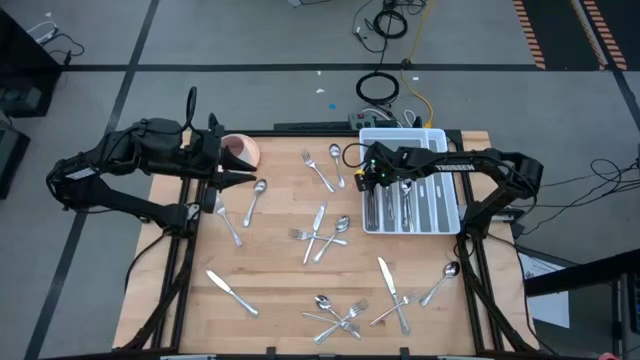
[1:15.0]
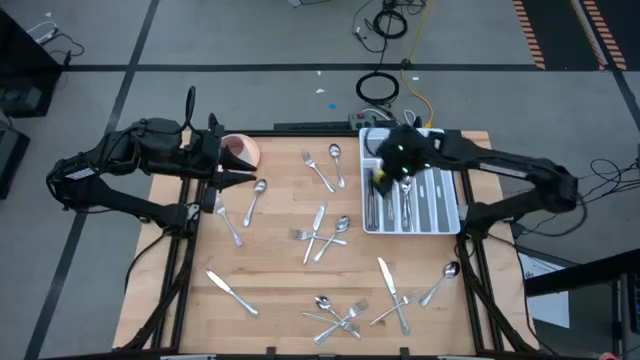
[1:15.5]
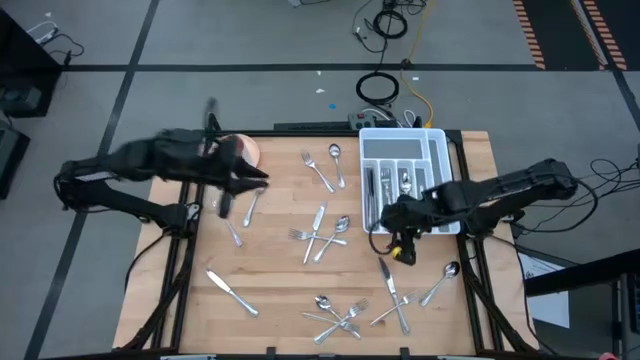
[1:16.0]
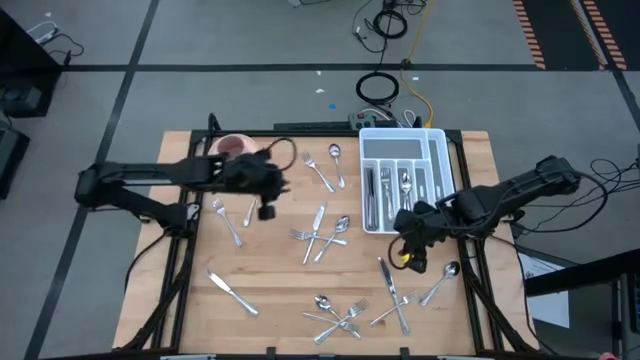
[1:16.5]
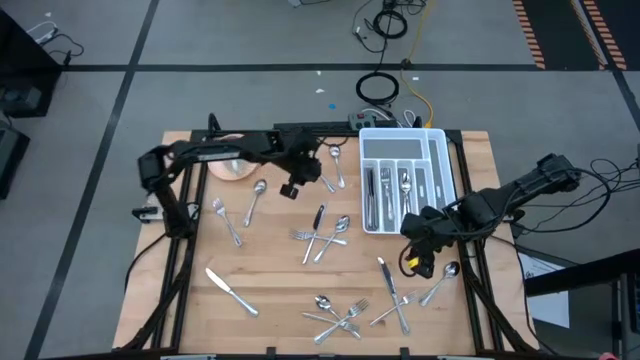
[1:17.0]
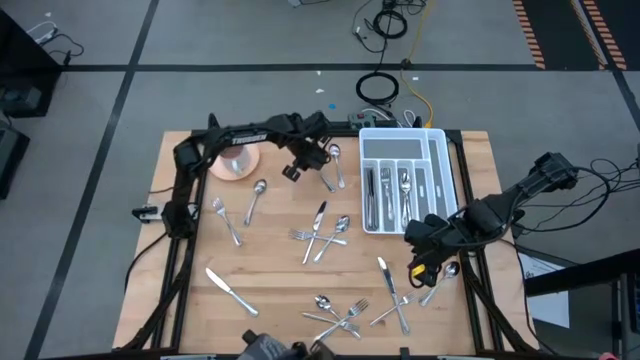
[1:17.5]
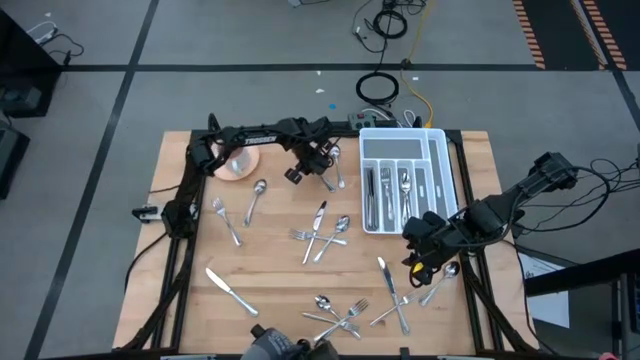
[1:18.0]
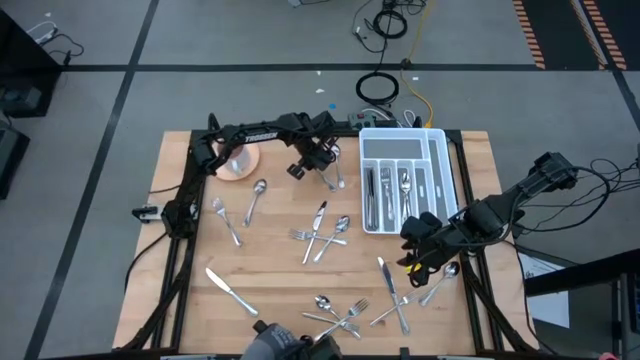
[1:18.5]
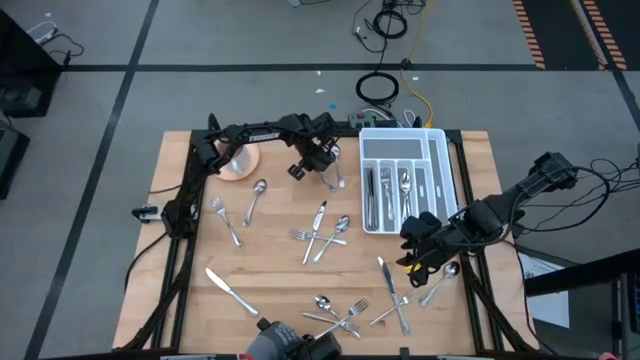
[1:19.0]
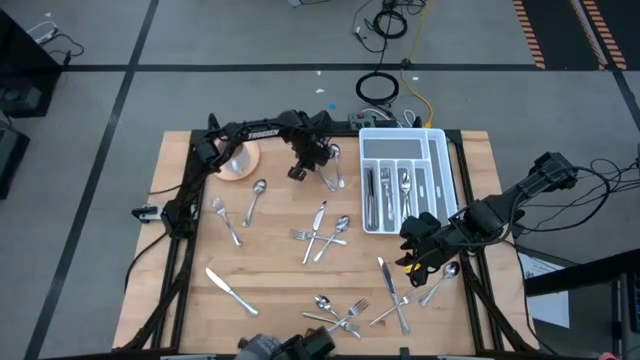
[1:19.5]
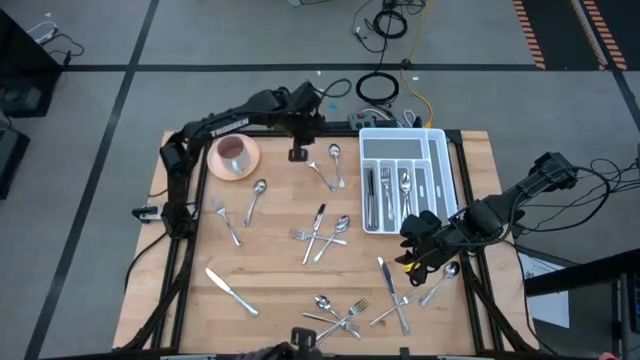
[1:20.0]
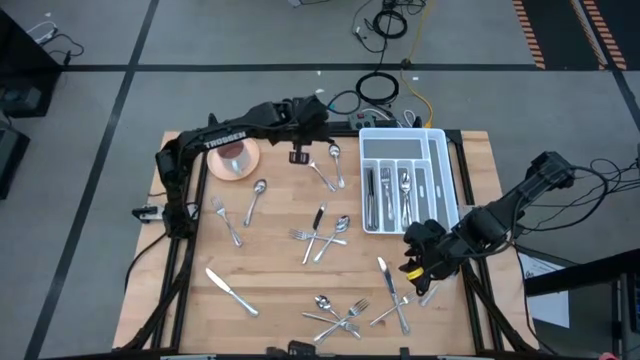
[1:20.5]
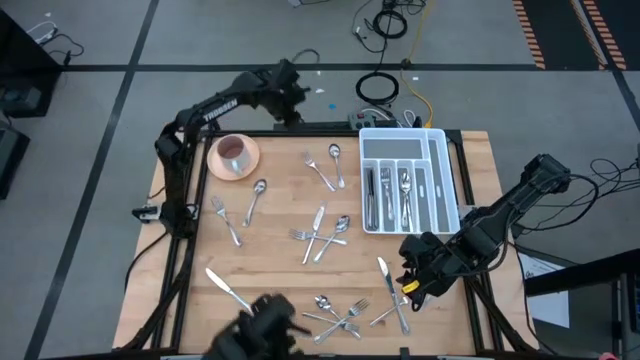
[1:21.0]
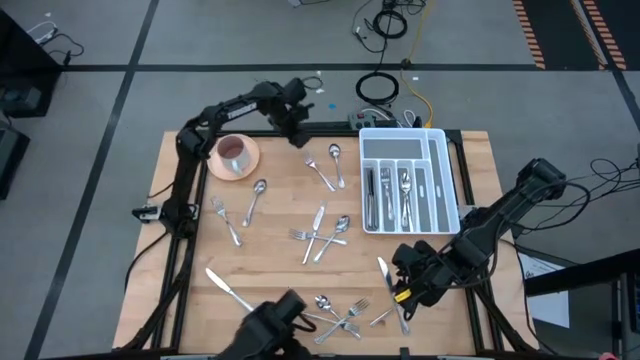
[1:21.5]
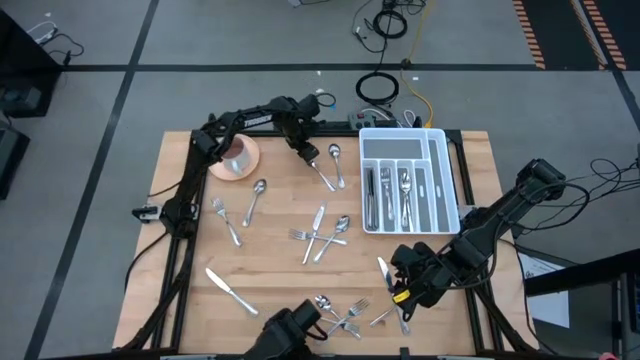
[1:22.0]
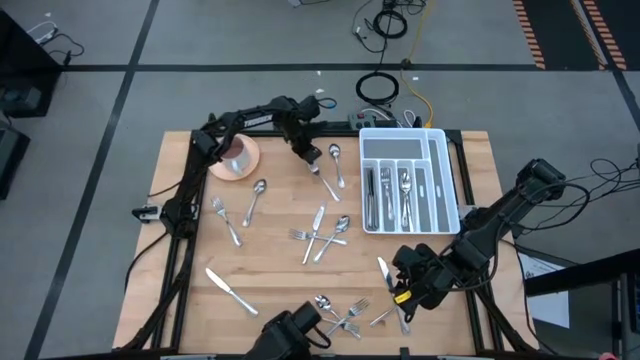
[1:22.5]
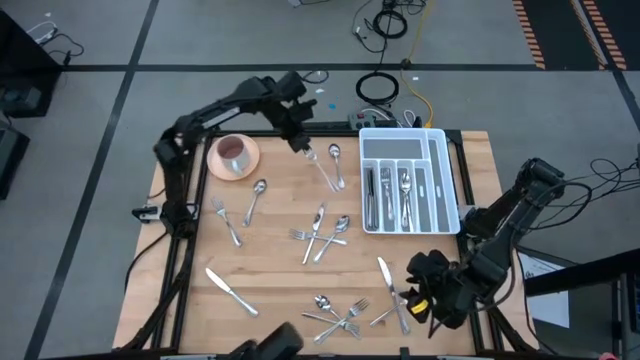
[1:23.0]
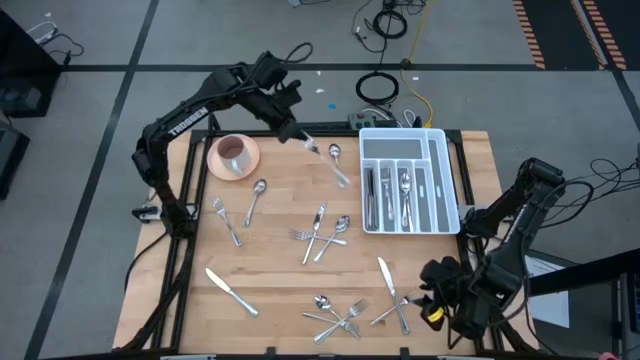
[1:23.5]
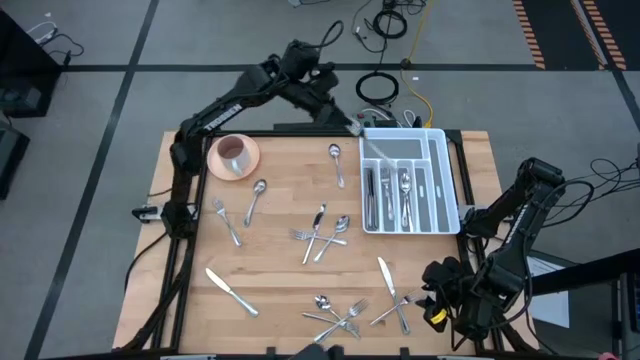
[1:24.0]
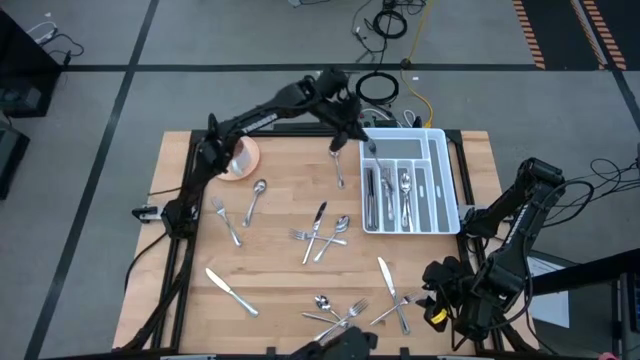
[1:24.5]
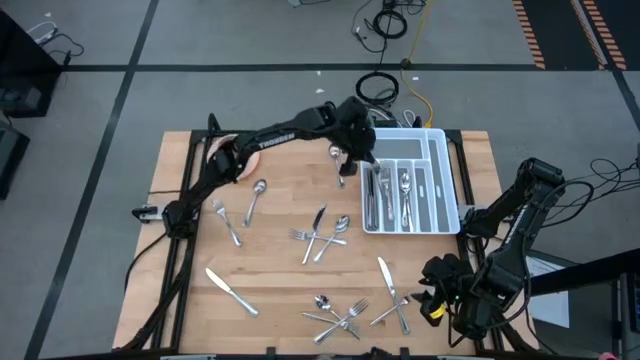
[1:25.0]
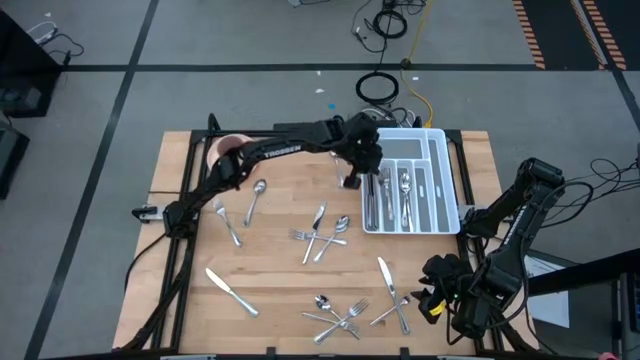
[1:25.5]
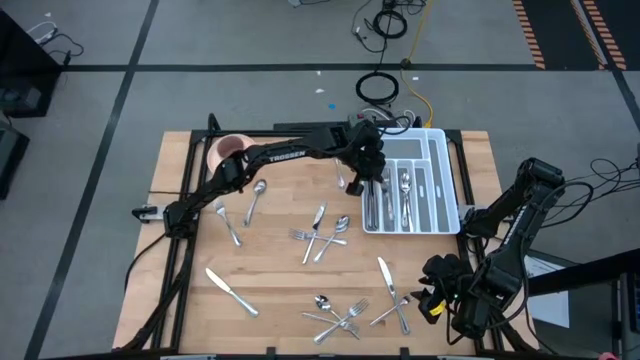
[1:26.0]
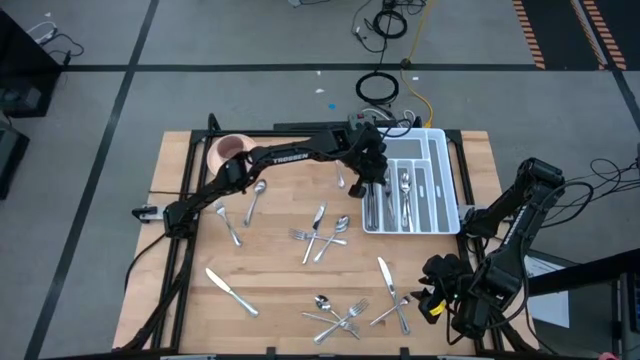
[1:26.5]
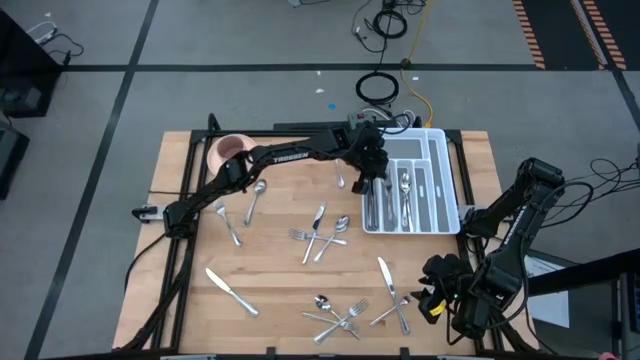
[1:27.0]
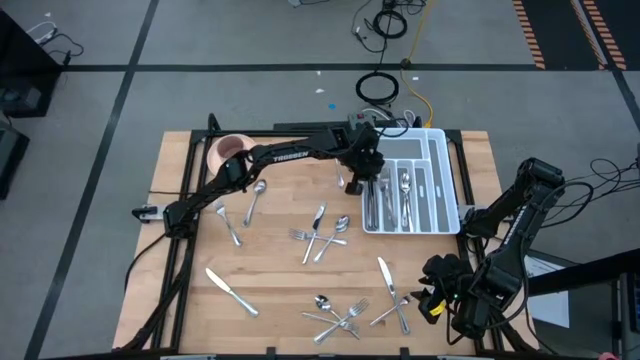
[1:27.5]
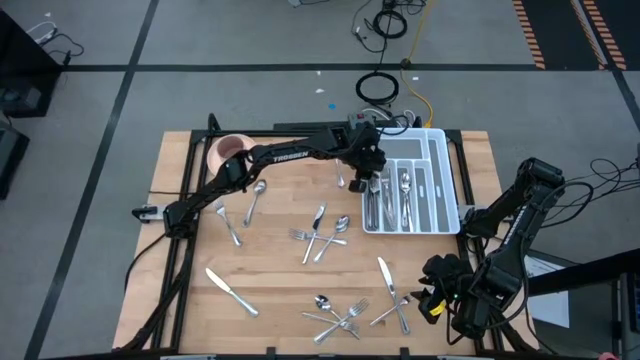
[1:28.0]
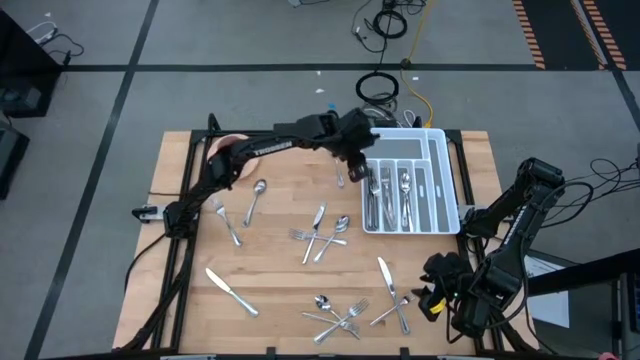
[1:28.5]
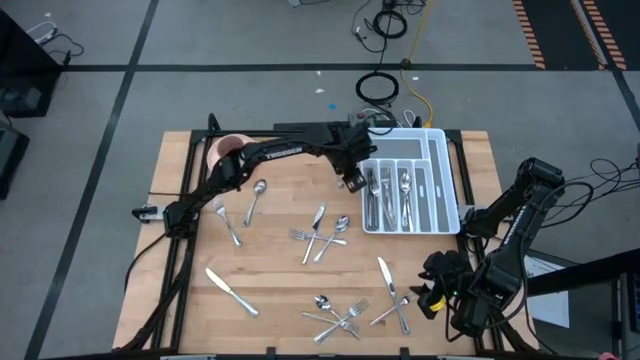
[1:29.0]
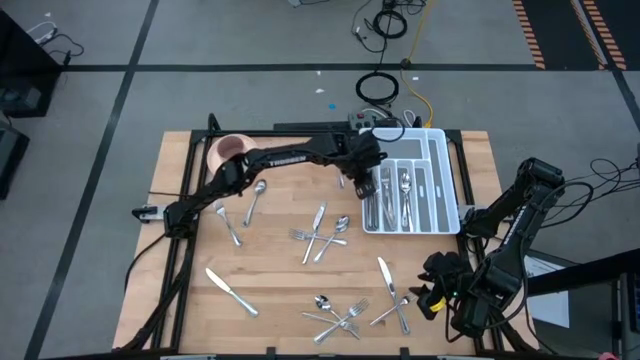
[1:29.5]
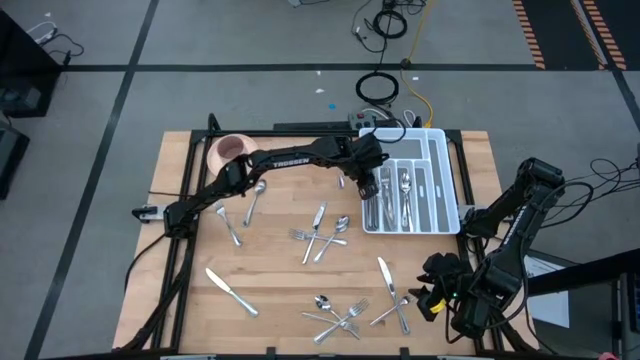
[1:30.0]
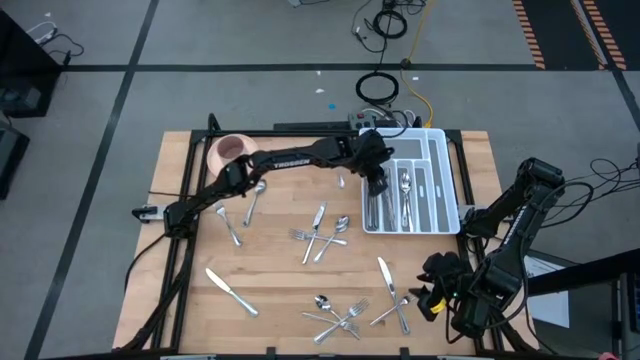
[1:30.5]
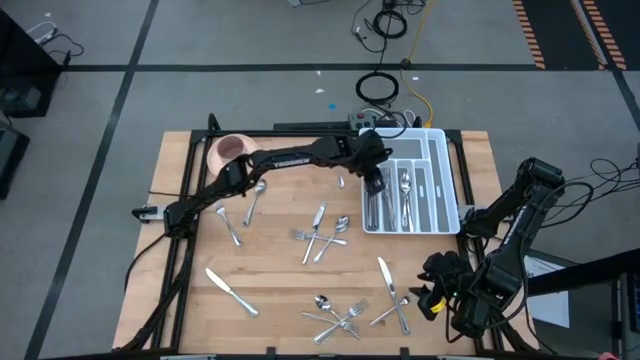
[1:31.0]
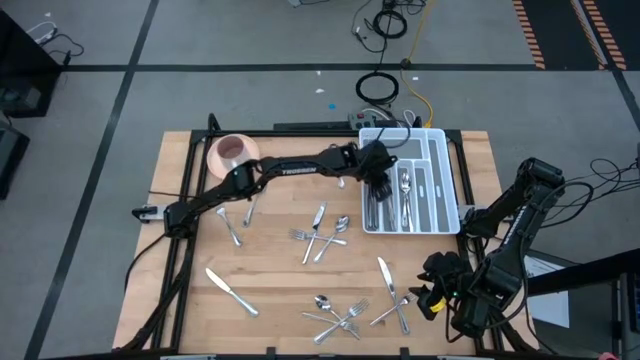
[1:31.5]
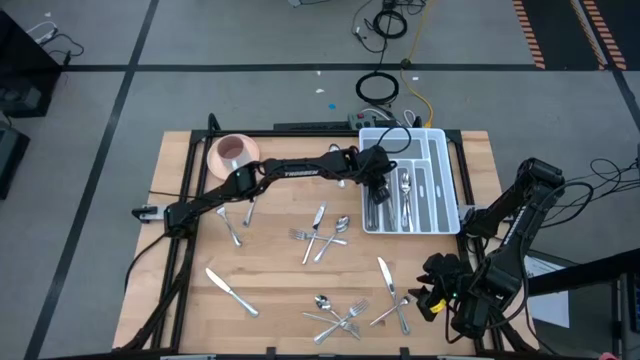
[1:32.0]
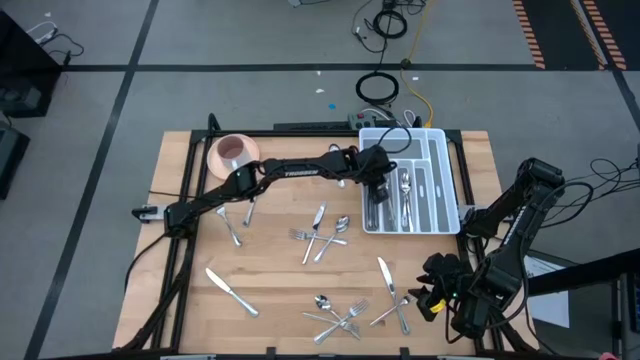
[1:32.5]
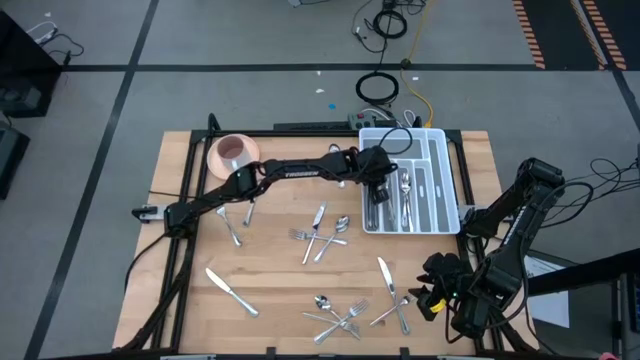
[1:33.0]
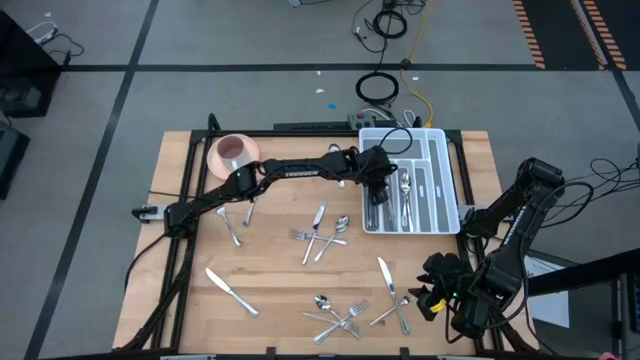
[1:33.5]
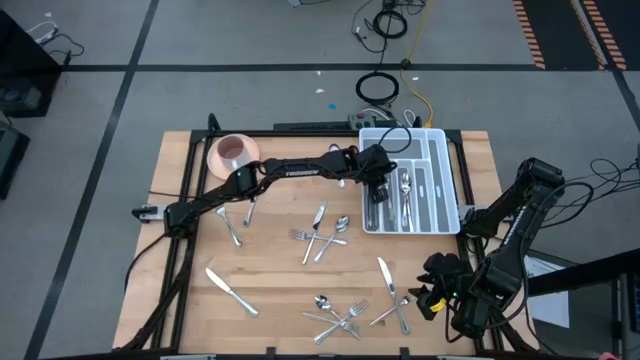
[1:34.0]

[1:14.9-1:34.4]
Task: Sort silverware
Put the silver fork into the white cutlery tray

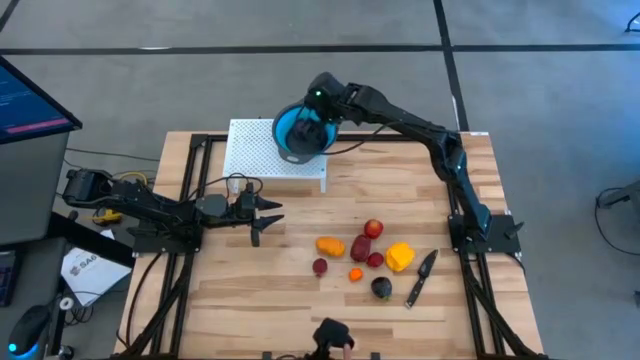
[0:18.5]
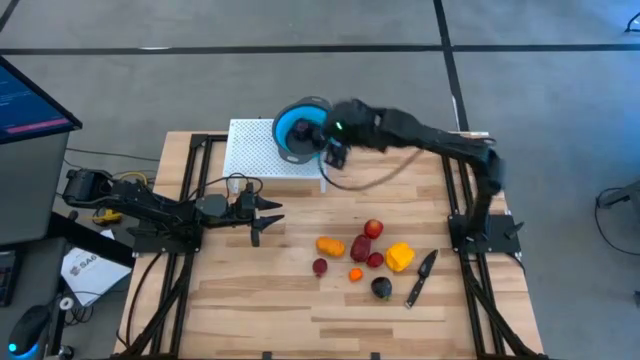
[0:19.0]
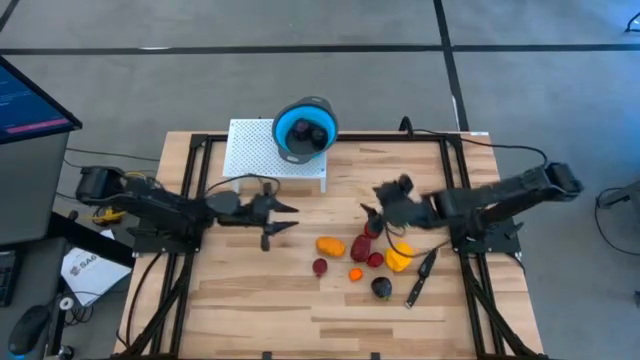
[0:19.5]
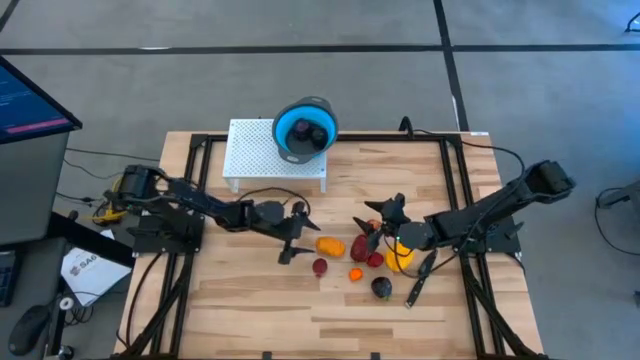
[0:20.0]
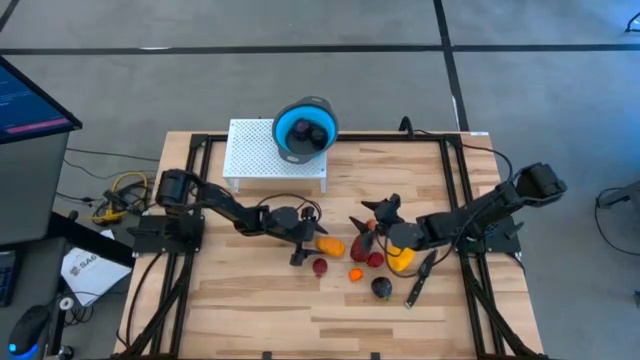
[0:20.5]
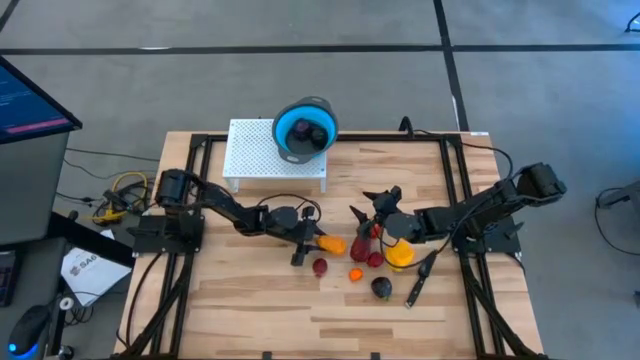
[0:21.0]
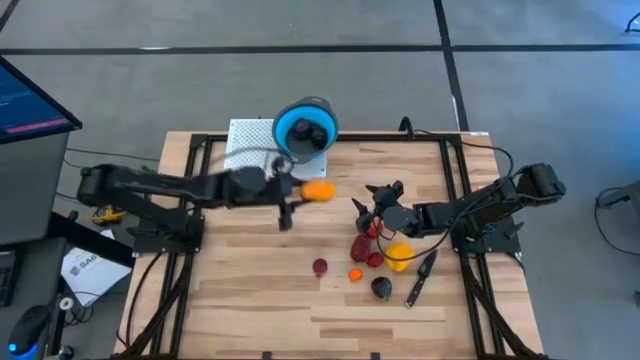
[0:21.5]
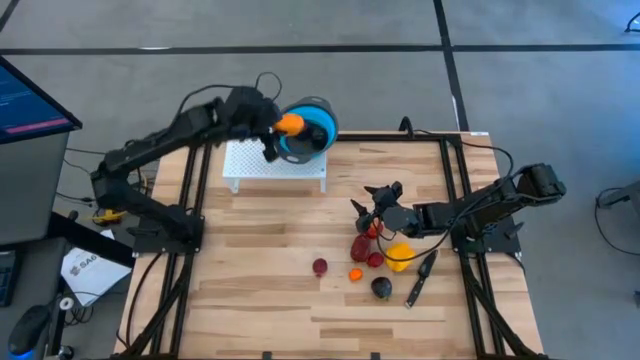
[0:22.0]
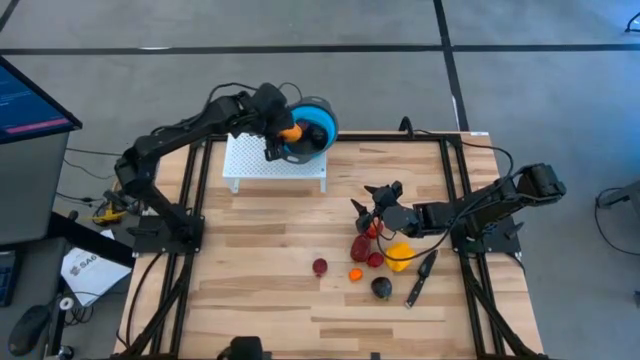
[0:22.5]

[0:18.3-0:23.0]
Task: Pick & Place Fruit
Put the yellow mango into the blue strainer bowl
